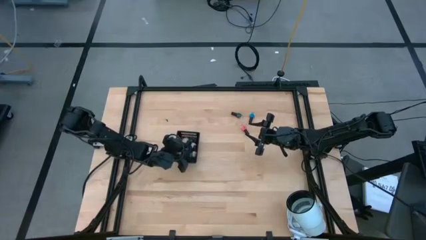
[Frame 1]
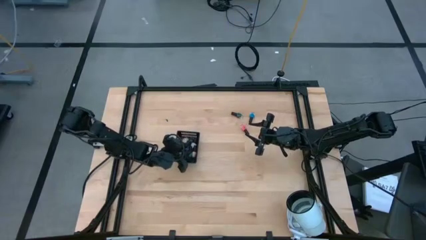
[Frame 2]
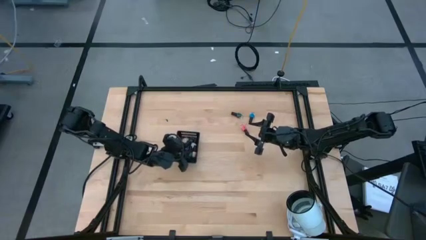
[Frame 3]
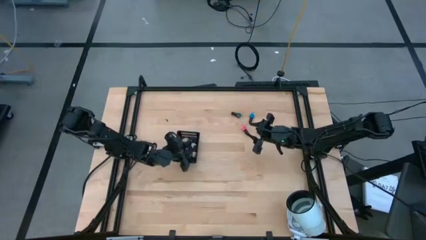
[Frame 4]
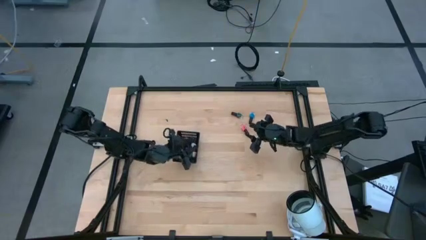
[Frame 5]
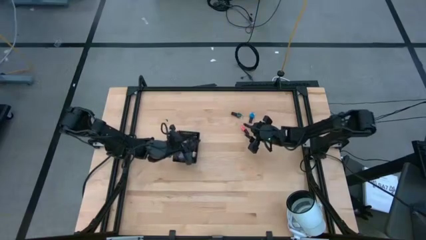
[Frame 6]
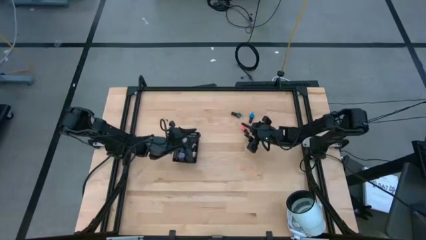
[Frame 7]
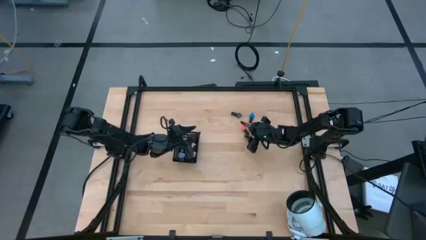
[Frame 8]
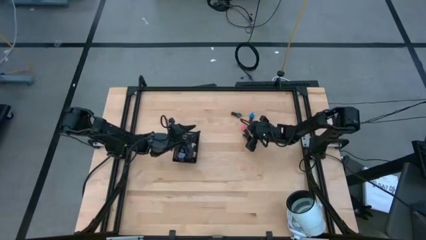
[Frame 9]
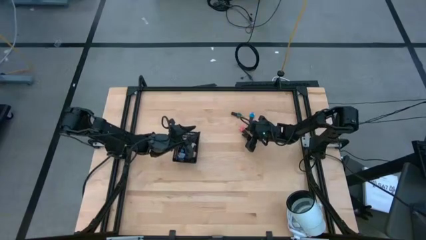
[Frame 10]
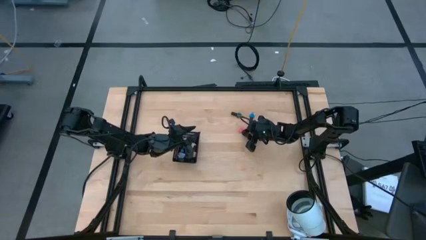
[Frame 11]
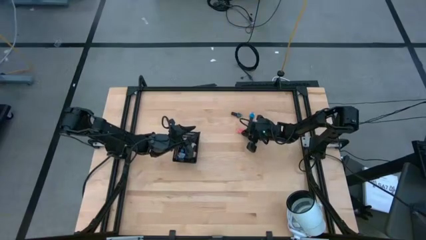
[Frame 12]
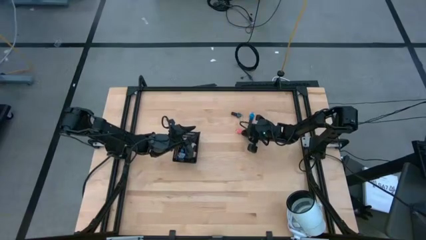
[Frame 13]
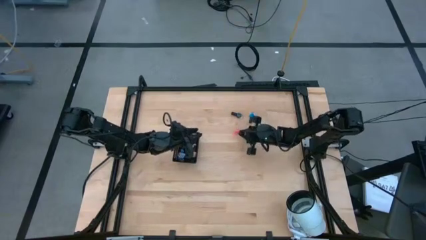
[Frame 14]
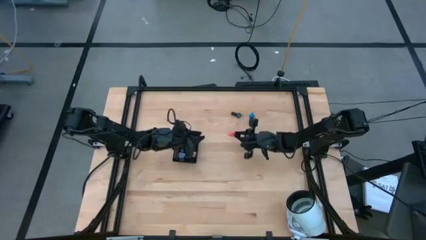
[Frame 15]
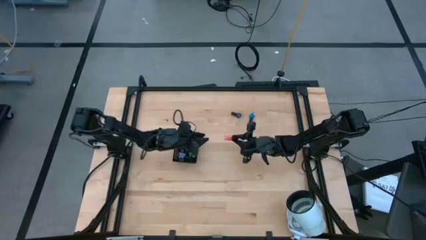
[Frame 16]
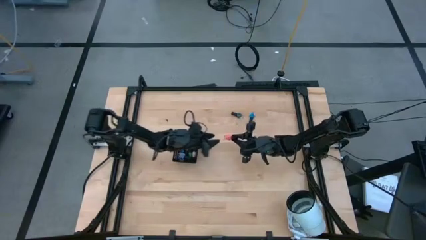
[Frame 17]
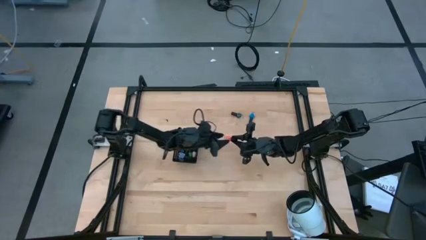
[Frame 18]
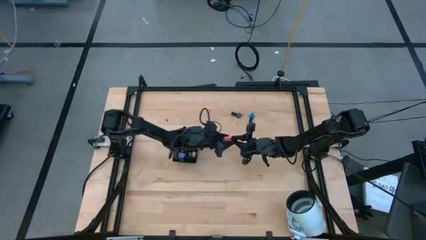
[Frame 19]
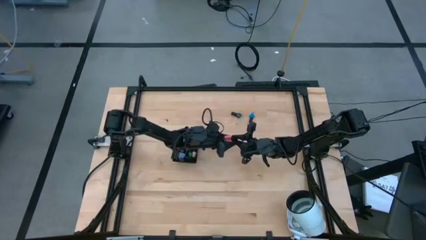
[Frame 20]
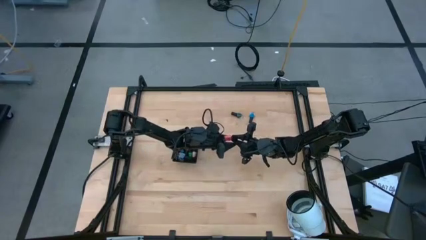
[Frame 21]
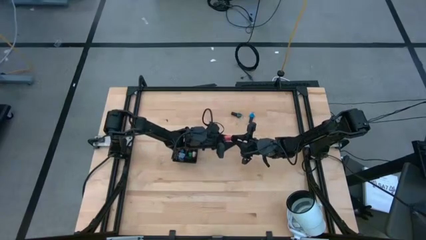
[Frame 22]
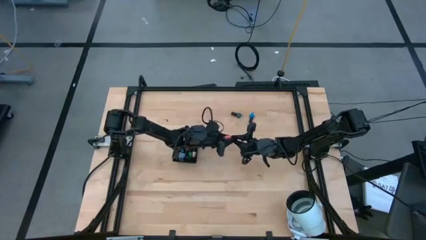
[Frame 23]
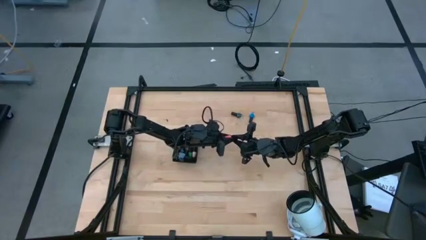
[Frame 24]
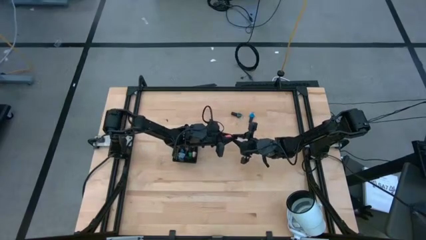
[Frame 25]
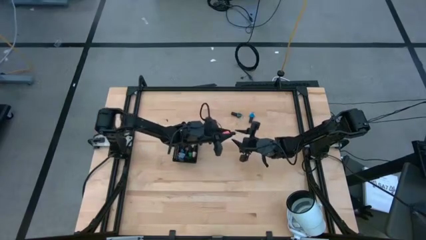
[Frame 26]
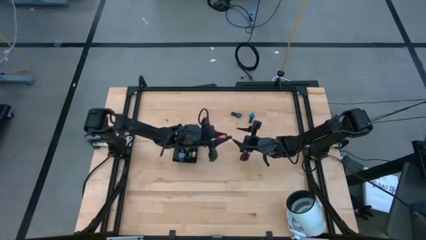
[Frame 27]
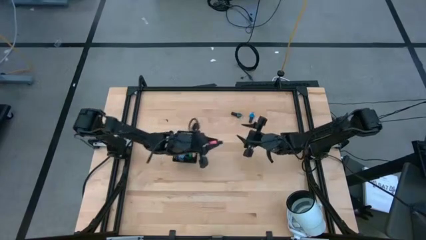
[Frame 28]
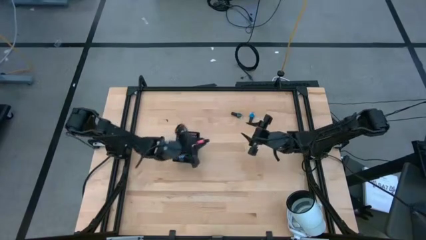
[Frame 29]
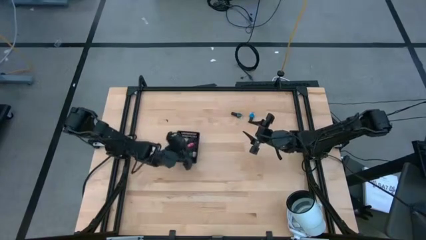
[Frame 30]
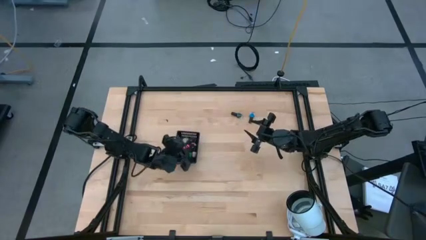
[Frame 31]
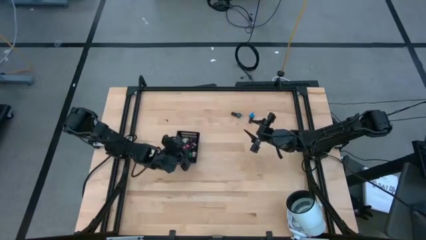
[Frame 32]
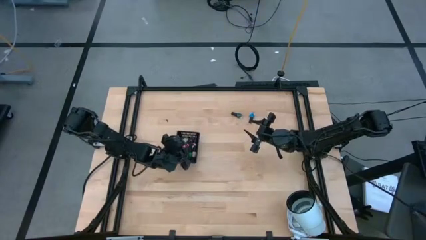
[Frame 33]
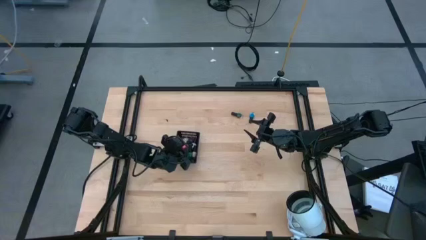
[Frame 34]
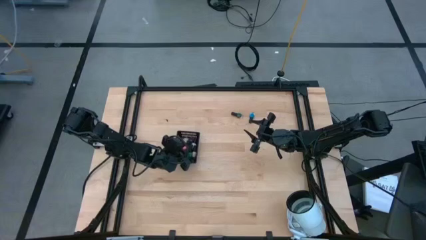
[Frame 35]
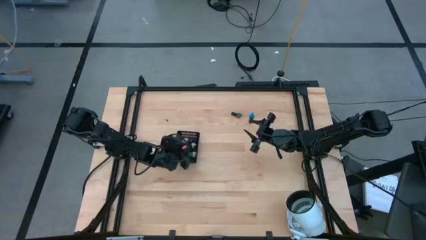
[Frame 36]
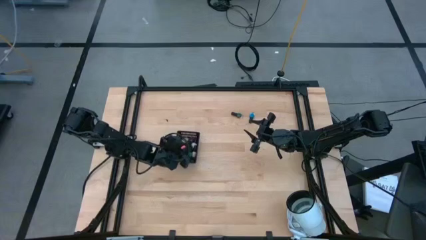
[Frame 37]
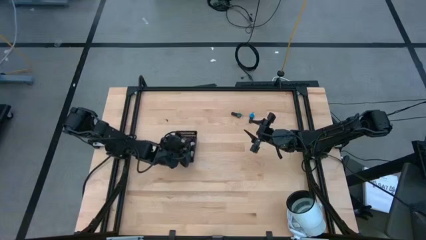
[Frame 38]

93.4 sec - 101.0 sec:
Task: Pick & Place Nail Polish
Put the pink nail polish into the basket

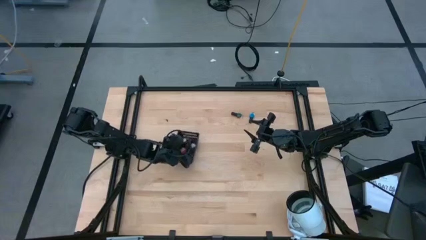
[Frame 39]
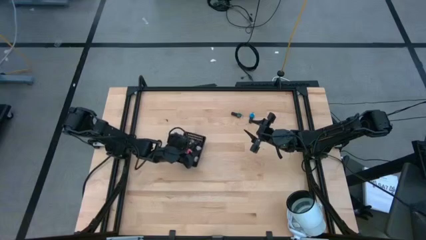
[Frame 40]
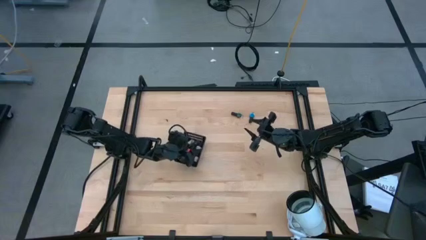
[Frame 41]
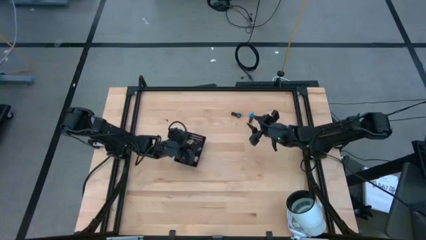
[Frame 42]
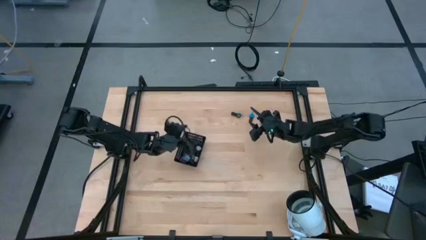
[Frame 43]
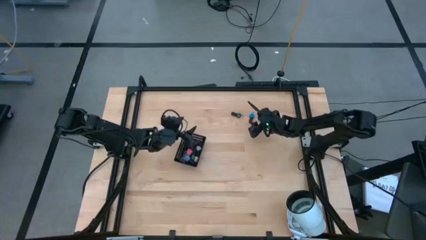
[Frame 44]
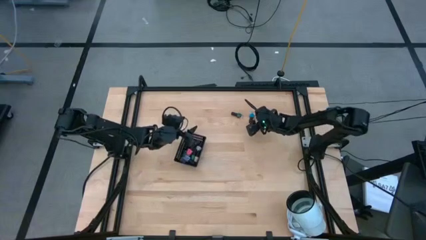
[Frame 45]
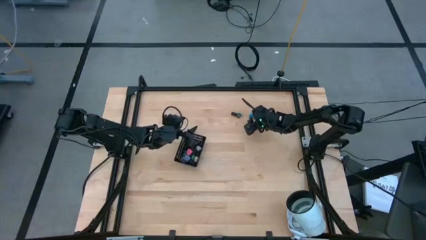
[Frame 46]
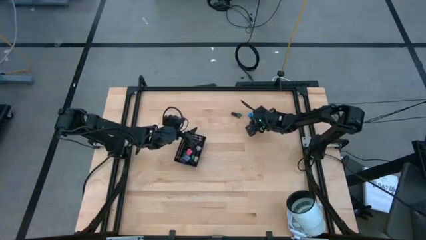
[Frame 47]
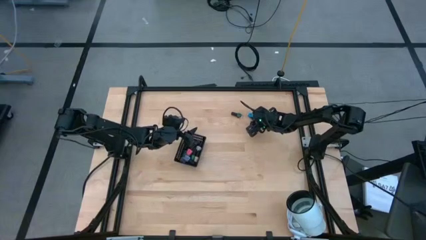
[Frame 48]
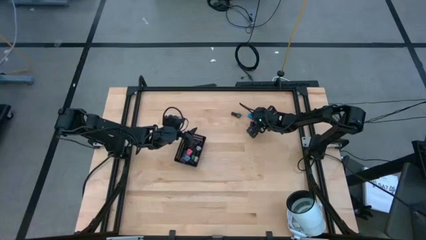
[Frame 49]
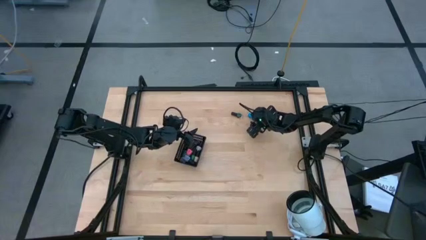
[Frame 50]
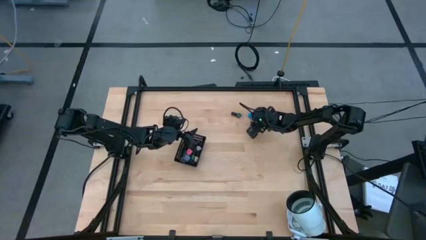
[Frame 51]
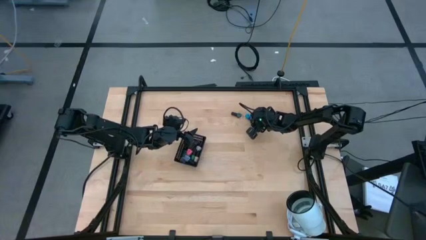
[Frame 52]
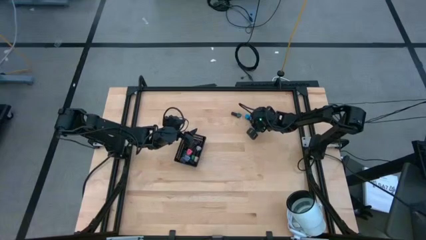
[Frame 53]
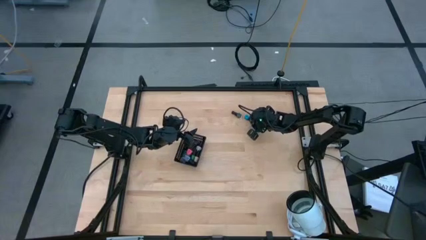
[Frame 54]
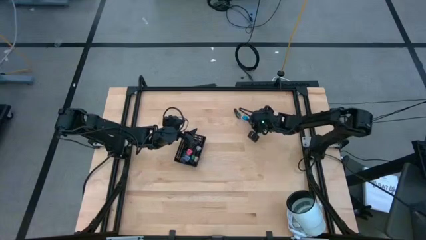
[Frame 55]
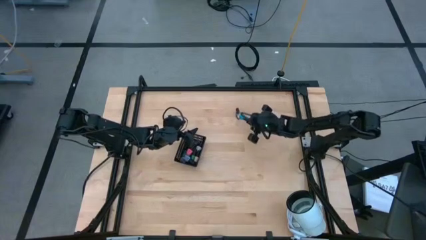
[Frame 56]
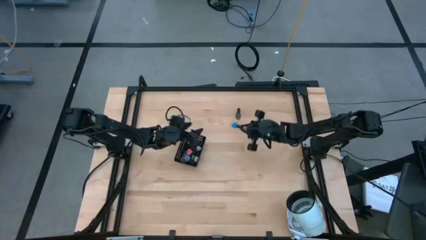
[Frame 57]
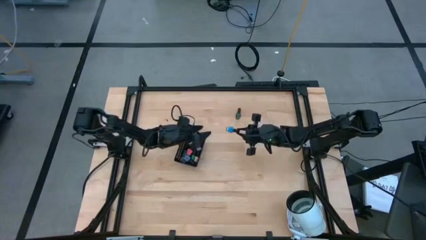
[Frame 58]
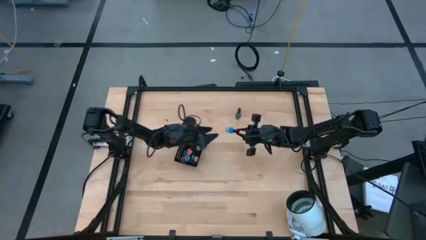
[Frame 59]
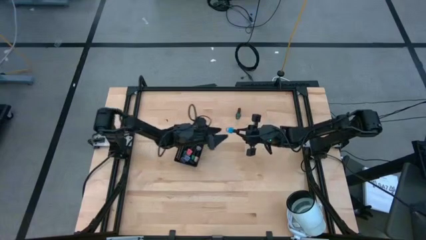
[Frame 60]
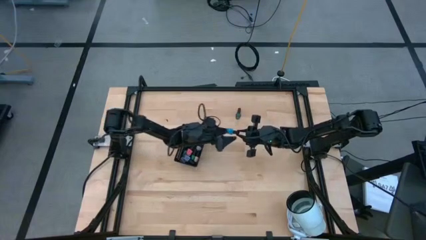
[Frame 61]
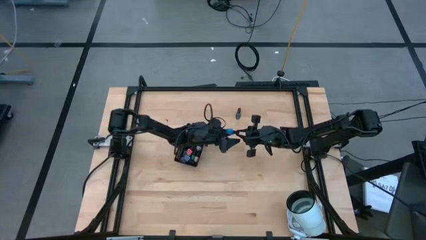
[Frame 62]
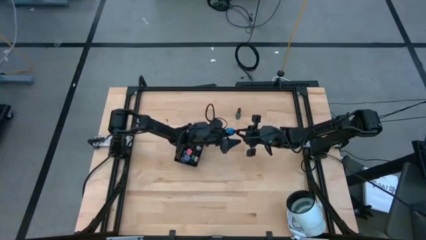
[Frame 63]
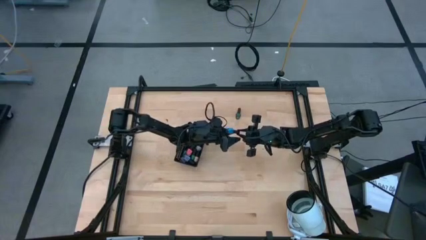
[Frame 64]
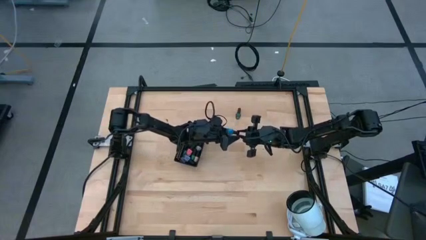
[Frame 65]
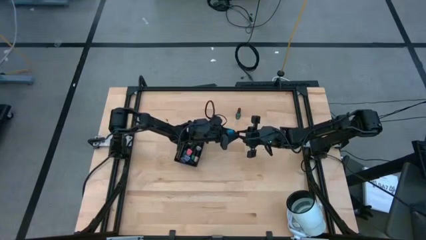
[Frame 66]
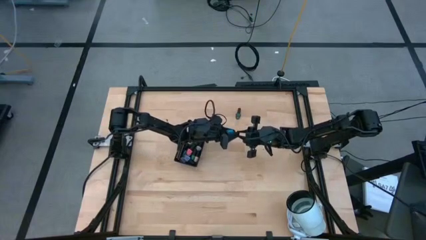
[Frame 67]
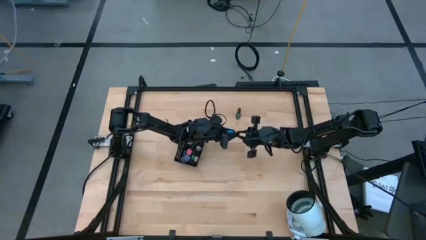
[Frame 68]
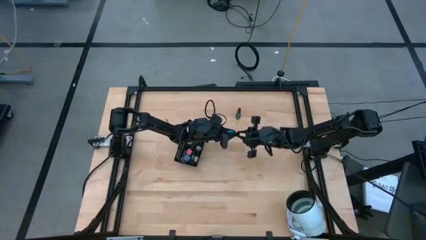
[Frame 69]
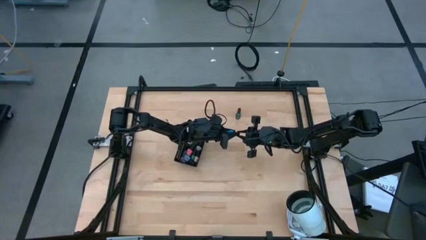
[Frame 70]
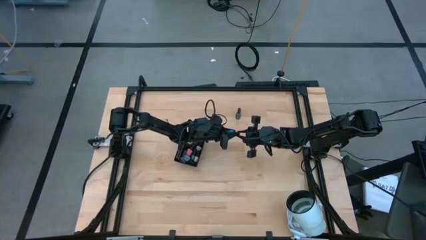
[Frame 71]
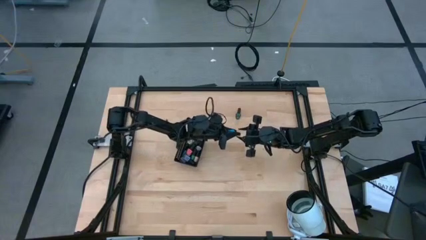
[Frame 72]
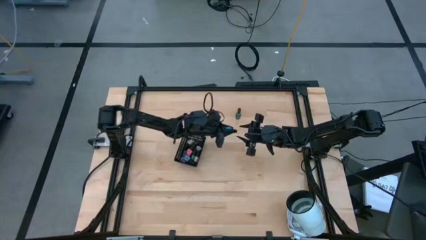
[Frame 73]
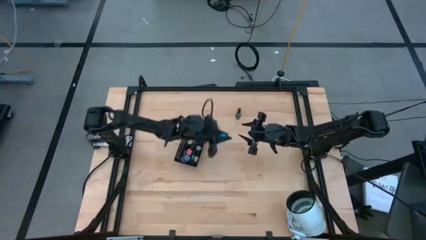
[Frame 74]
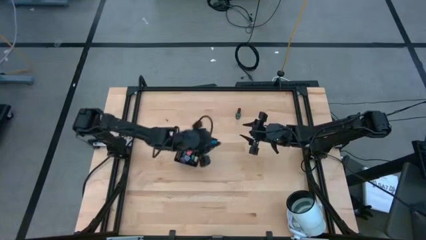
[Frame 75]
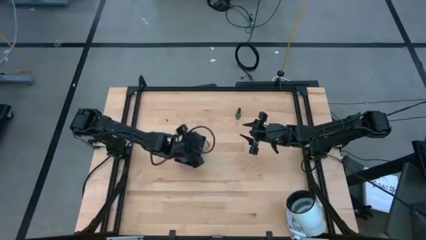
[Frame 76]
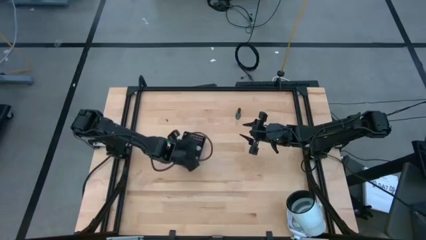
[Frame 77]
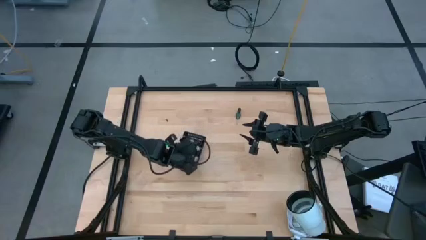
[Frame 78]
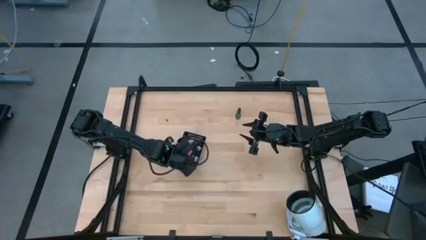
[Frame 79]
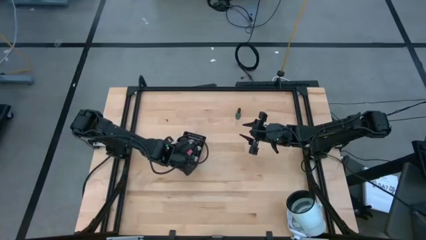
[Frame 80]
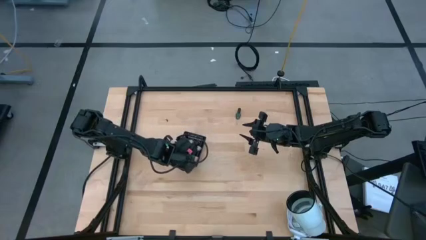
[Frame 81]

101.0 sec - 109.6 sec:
Put the blue nail polish into the basket
